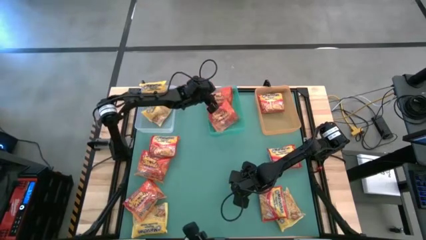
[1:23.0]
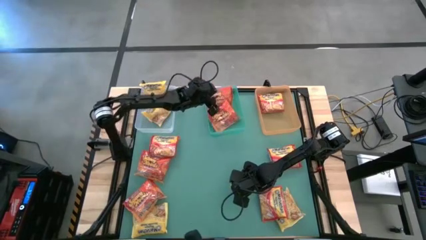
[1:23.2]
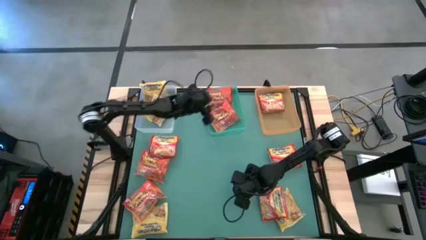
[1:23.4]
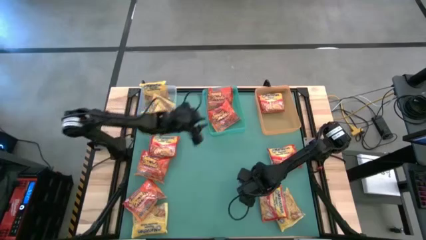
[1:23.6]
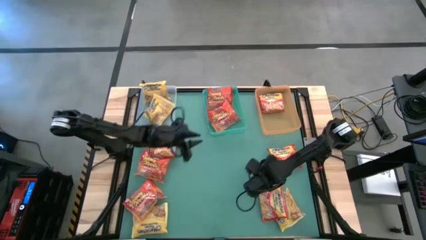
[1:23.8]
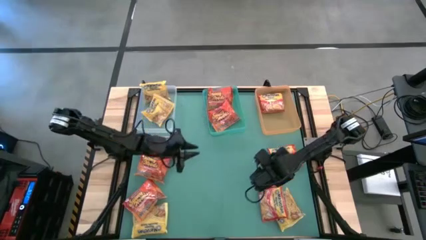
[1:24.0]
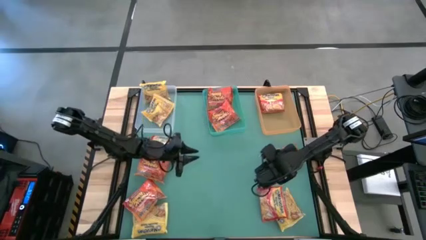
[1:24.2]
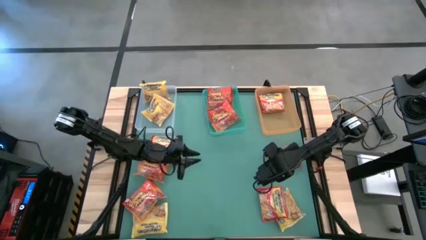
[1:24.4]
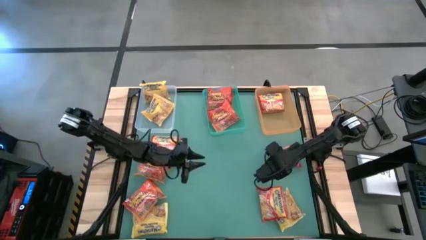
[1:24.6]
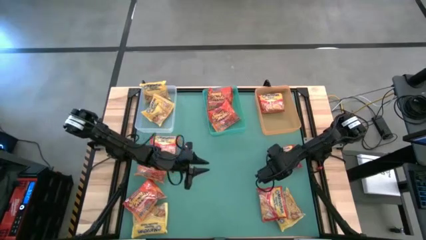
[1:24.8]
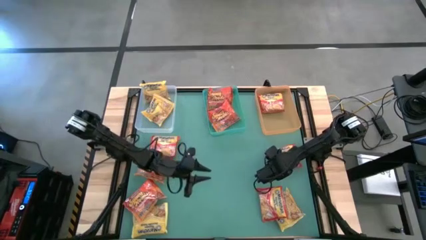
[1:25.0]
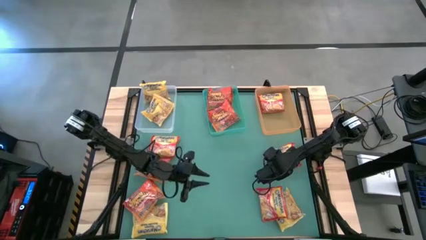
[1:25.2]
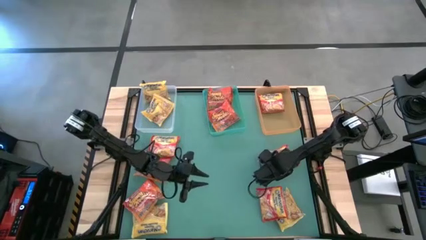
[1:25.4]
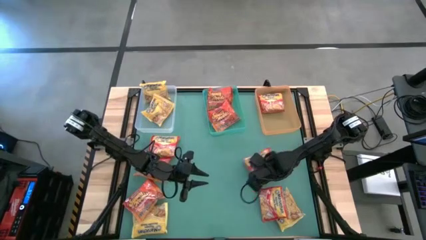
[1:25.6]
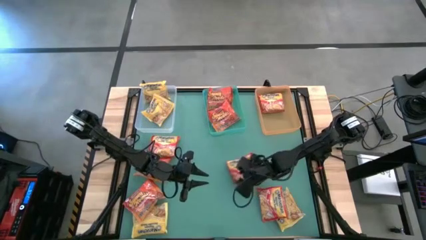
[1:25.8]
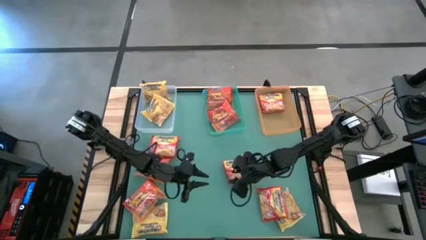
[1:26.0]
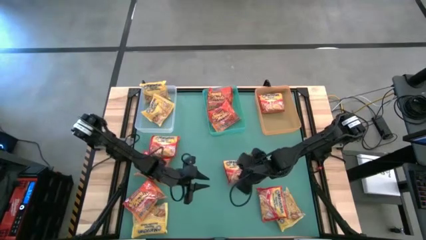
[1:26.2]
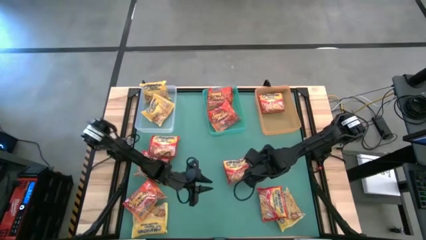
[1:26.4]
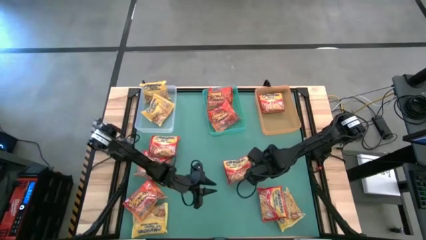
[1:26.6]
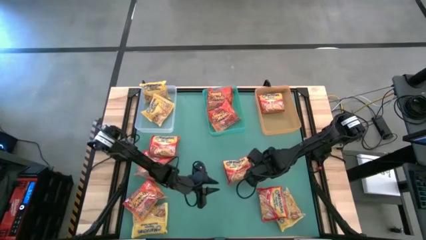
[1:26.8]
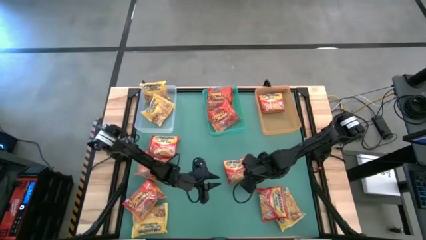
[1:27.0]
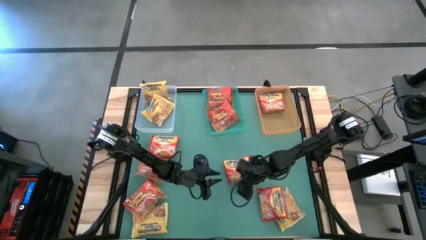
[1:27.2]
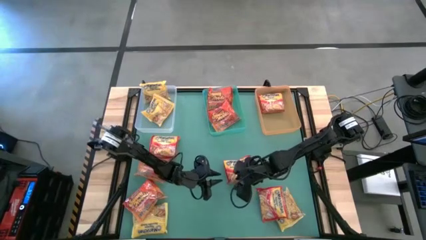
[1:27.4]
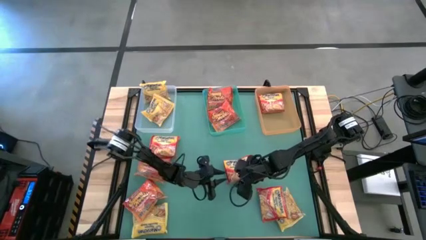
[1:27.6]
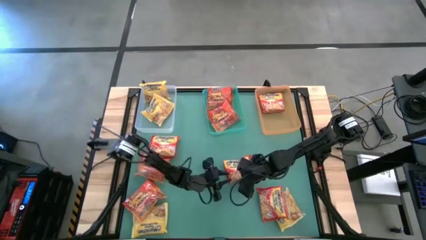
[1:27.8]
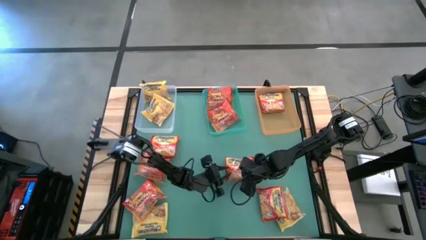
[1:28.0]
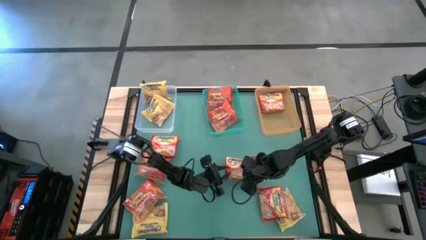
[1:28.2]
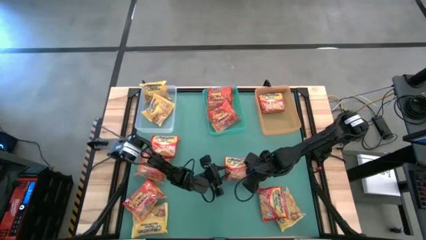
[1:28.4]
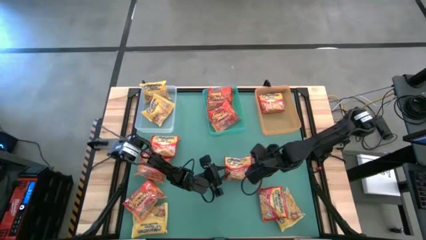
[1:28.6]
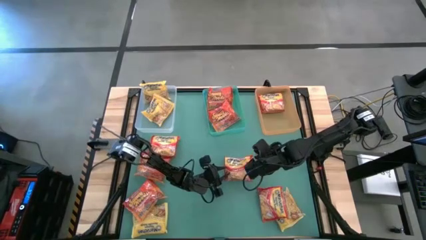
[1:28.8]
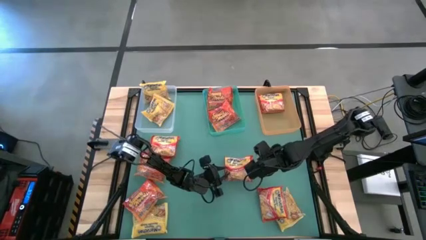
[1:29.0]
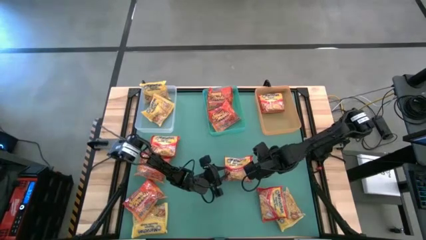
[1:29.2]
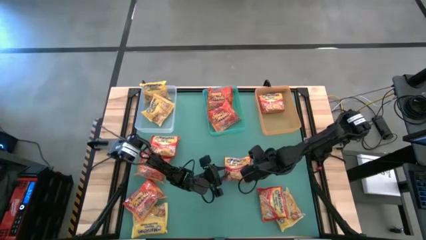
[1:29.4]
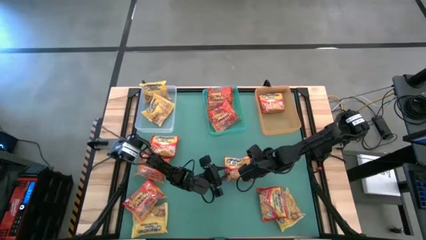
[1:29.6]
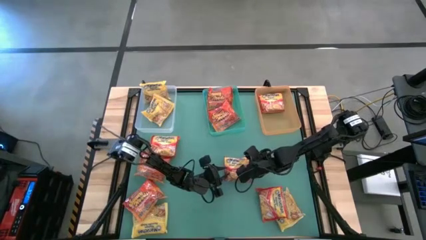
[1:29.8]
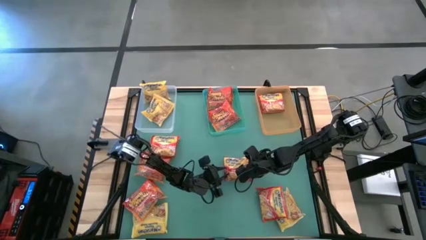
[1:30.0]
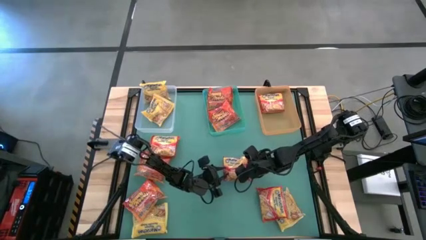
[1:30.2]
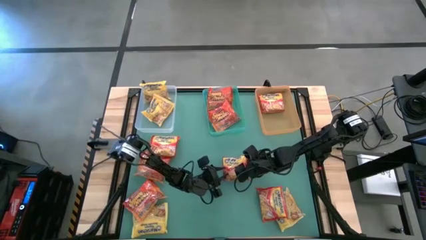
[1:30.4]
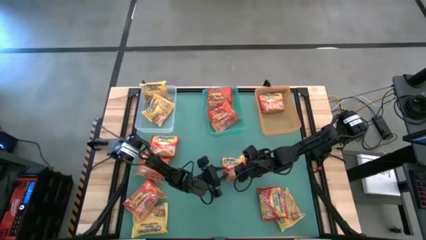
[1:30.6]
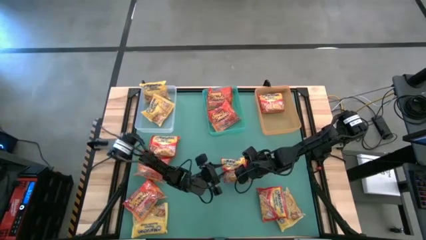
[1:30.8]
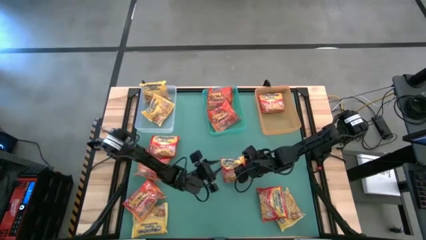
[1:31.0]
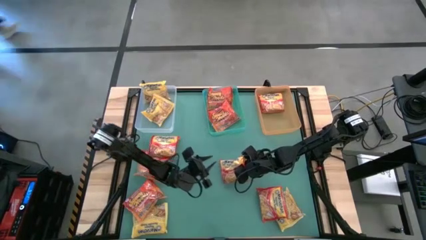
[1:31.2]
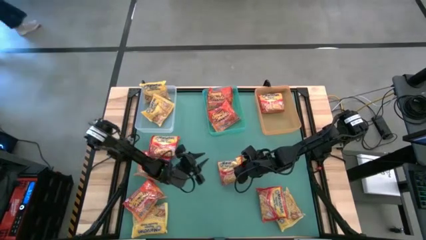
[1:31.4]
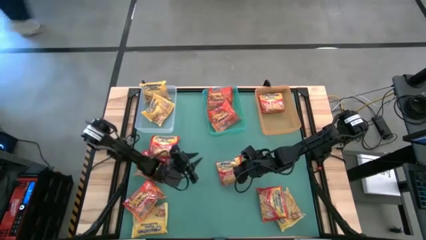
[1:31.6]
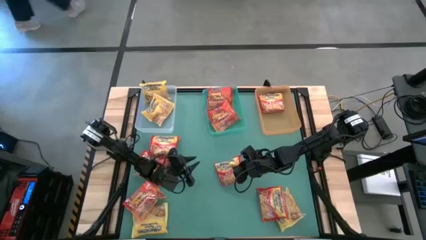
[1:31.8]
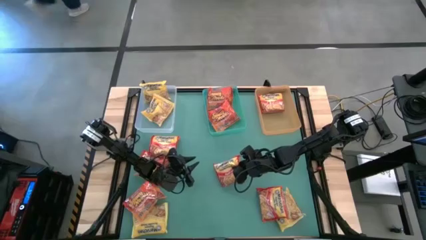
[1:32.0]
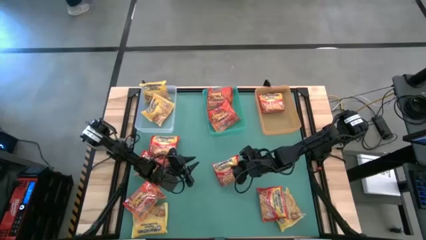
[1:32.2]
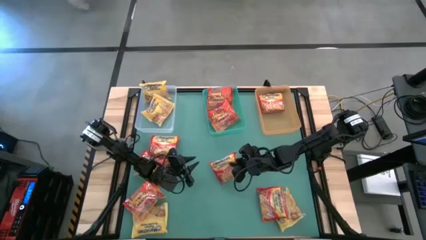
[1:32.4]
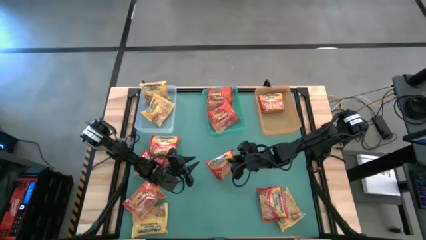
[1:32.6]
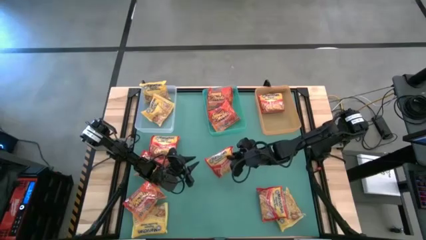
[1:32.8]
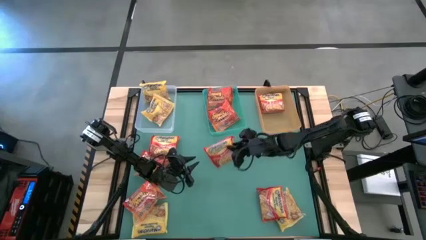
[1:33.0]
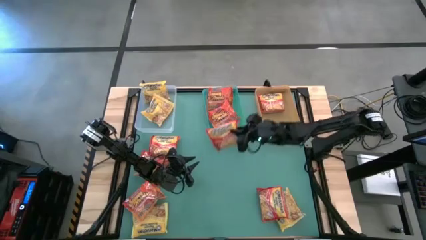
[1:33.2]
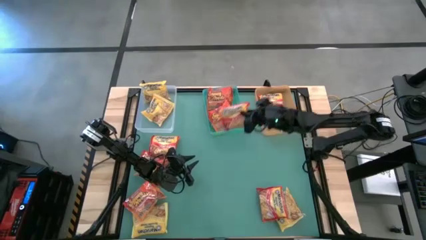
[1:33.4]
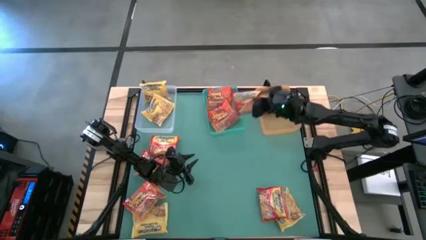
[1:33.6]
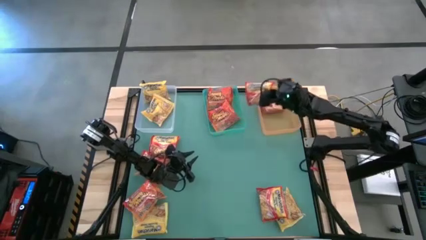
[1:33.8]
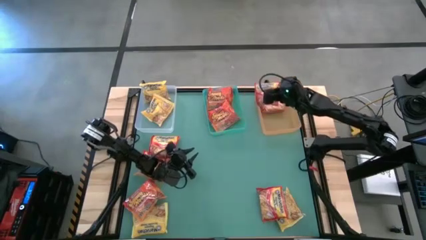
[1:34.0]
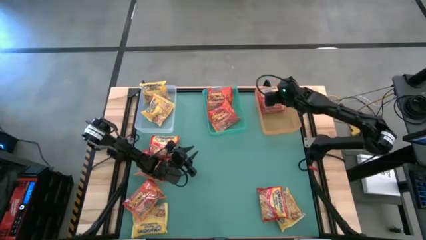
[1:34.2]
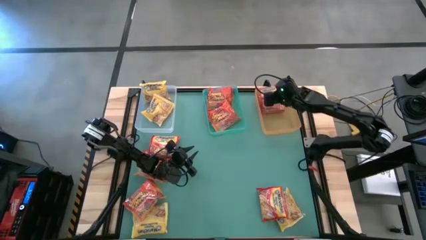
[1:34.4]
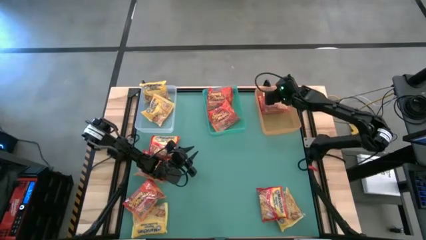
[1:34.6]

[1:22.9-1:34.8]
Task: Sort Maruchan noodles
Put the orange noodle pack into the orange bin

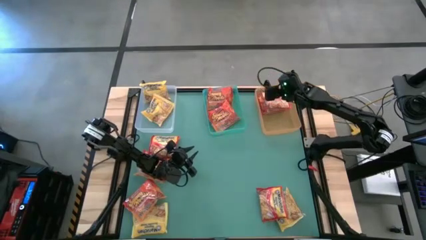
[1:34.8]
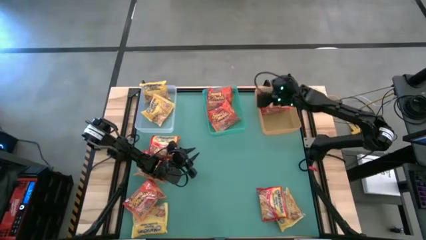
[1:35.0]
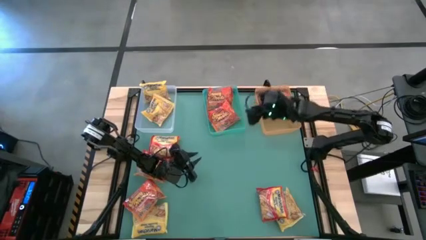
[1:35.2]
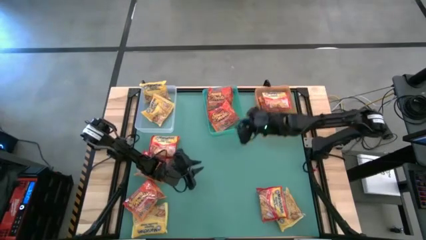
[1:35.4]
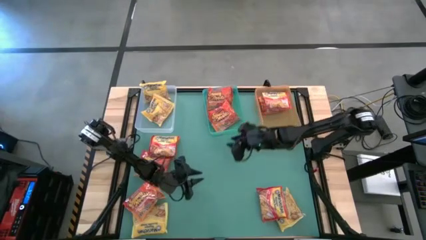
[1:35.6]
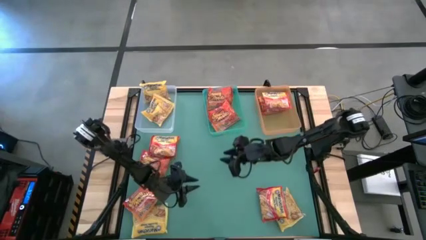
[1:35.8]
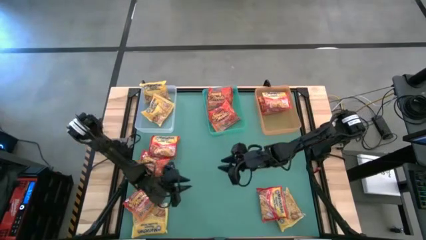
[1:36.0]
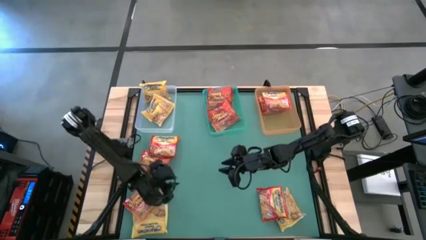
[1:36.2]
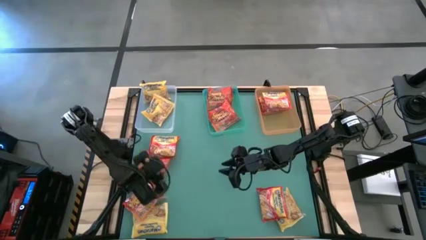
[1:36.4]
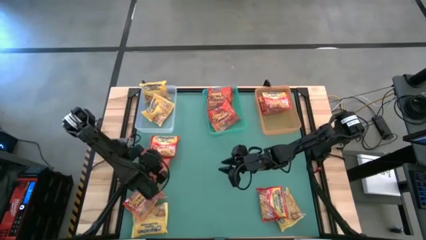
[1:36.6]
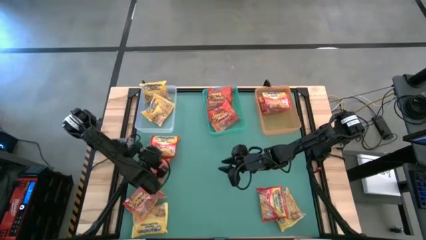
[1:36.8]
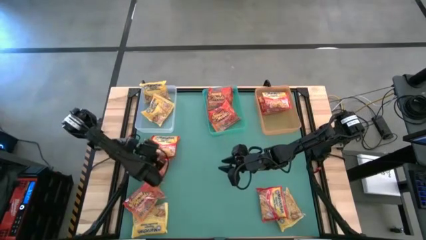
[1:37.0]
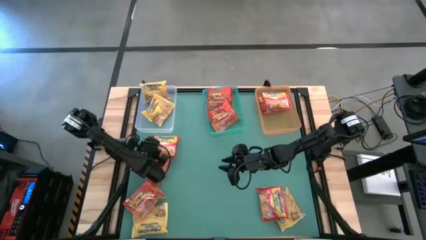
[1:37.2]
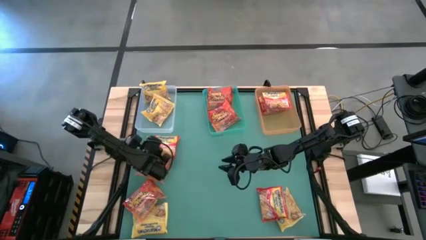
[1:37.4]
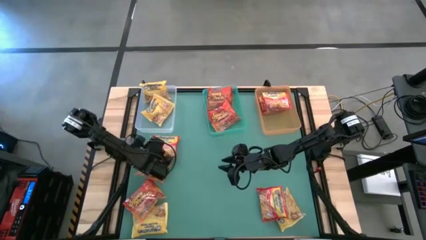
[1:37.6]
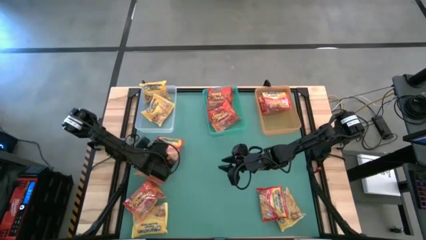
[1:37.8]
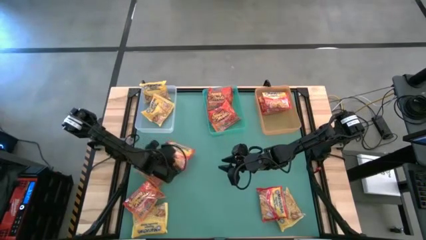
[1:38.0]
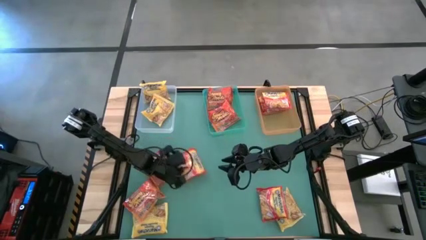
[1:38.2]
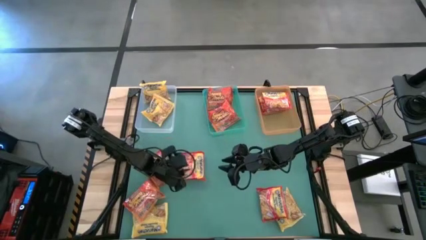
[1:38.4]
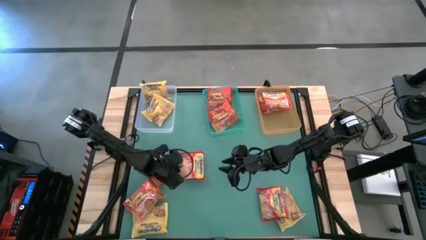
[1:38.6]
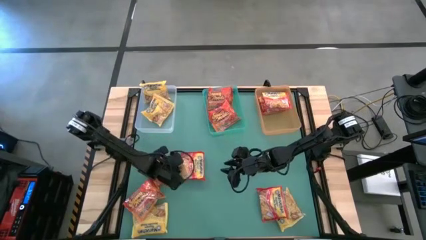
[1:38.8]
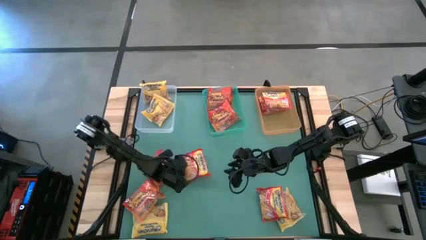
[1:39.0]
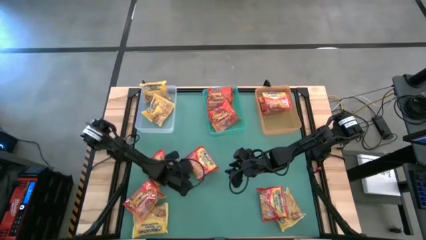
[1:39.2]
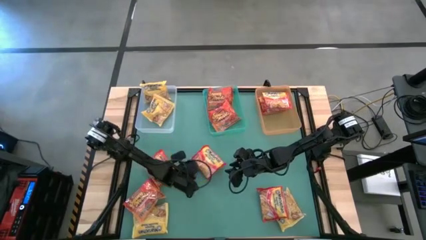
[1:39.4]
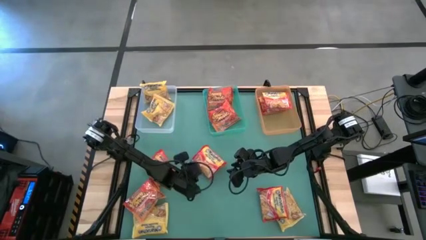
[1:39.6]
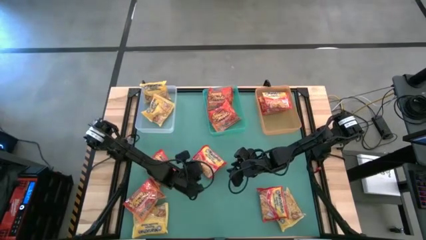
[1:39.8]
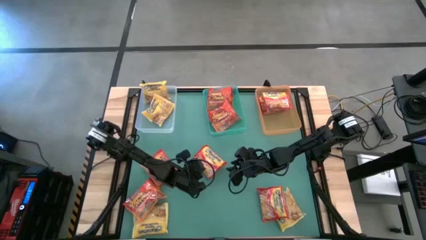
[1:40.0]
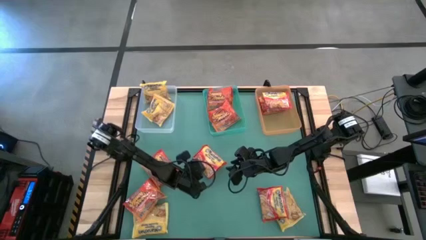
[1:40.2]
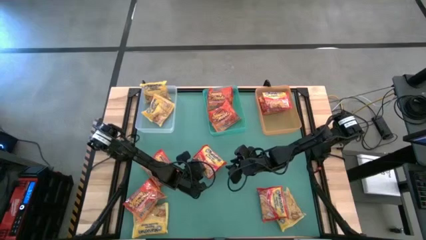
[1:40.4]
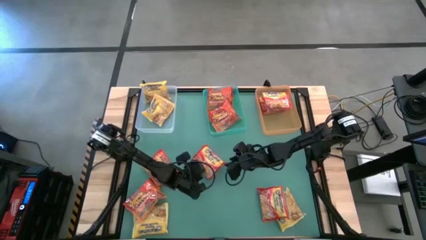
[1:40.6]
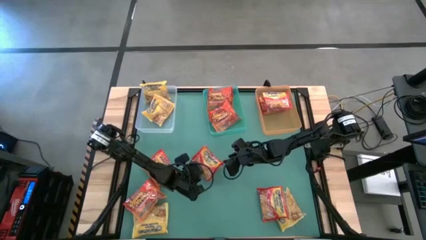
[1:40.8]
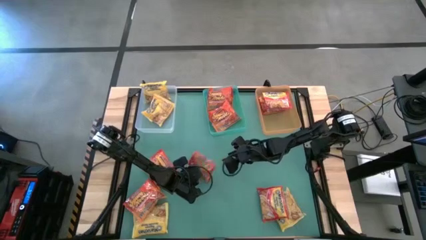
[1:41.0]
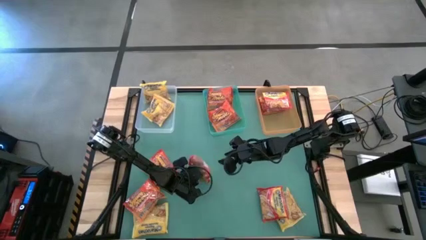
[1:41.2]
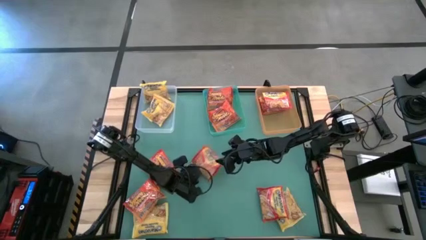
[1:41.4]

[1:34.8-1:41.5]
Put the orange noodle pack into the orange bin
